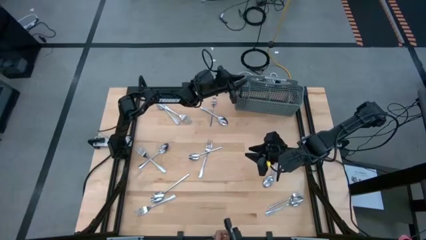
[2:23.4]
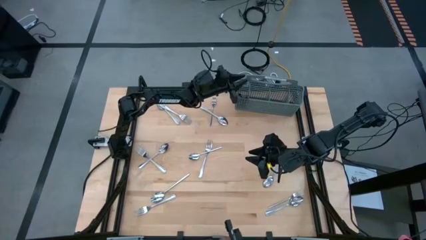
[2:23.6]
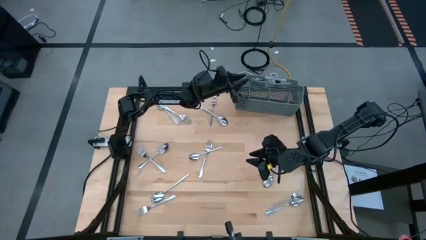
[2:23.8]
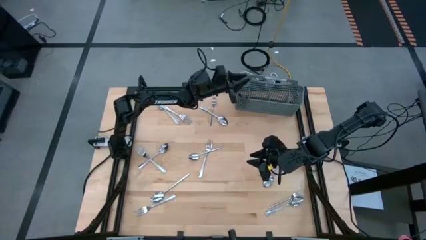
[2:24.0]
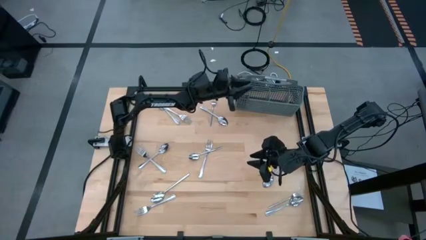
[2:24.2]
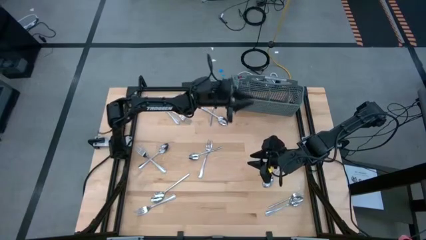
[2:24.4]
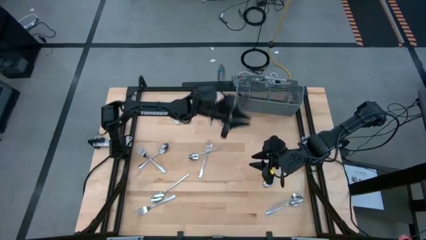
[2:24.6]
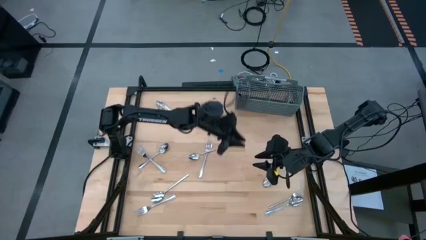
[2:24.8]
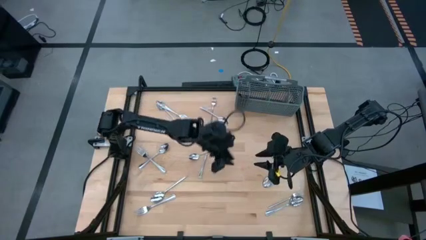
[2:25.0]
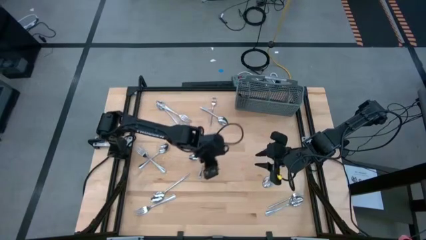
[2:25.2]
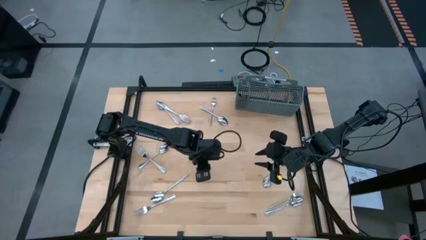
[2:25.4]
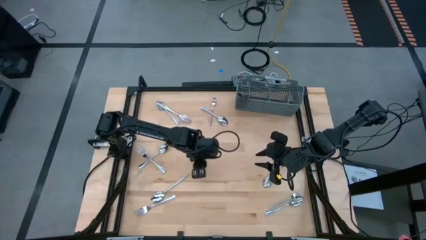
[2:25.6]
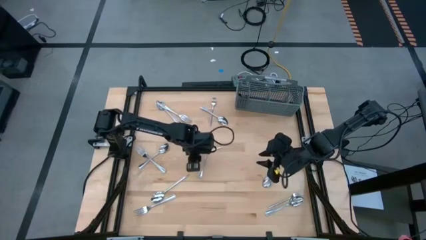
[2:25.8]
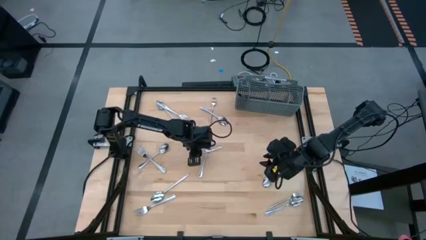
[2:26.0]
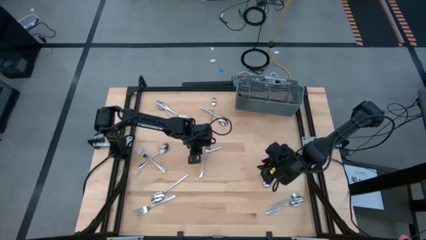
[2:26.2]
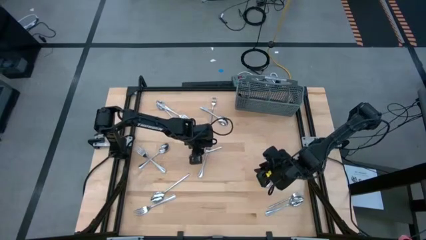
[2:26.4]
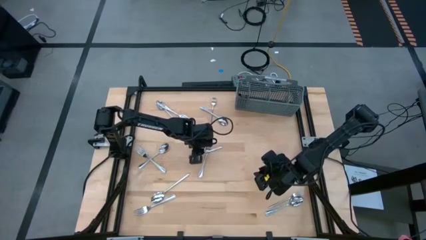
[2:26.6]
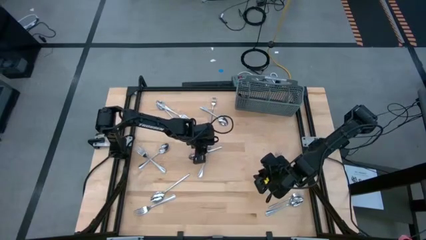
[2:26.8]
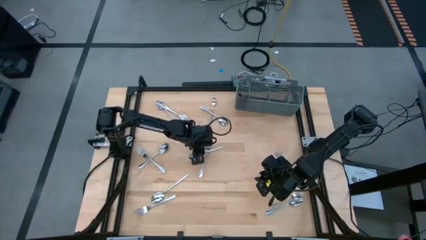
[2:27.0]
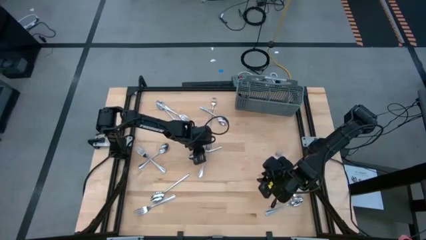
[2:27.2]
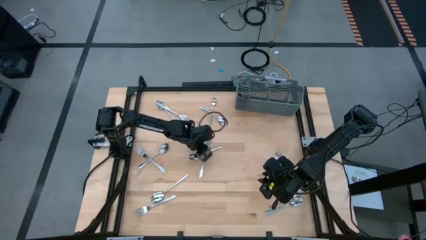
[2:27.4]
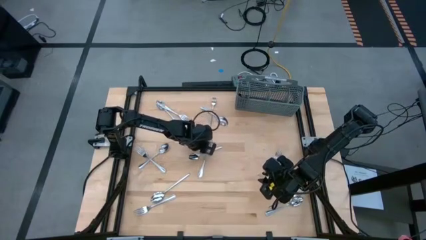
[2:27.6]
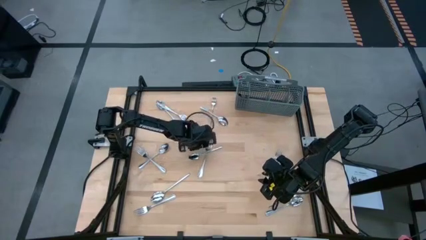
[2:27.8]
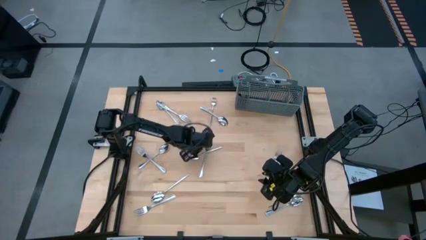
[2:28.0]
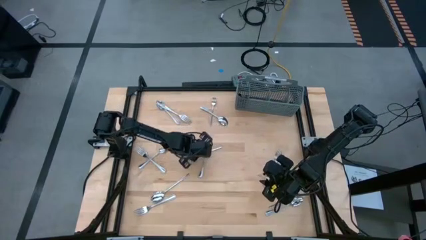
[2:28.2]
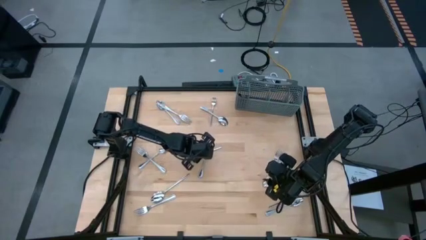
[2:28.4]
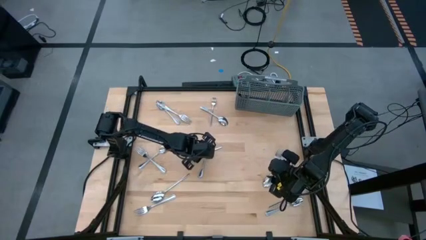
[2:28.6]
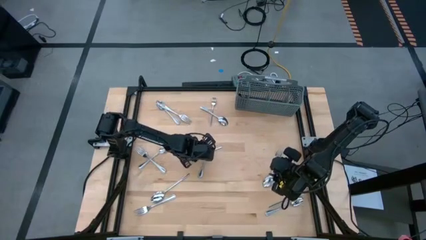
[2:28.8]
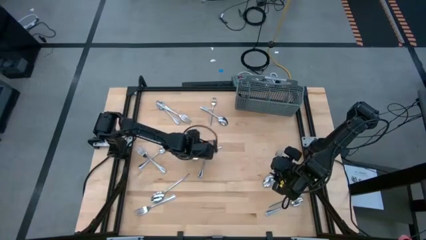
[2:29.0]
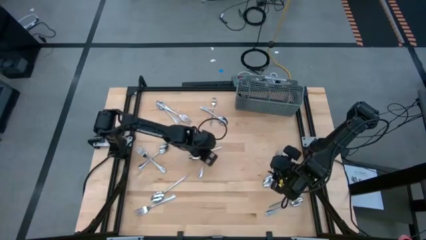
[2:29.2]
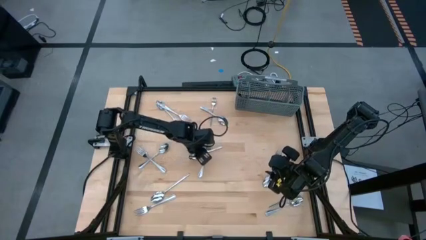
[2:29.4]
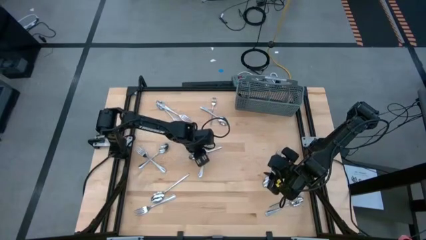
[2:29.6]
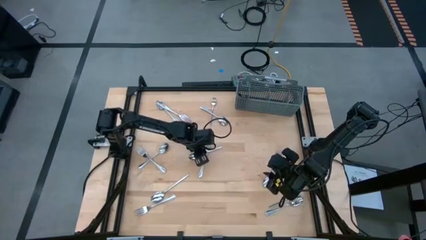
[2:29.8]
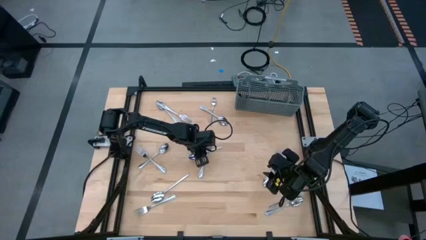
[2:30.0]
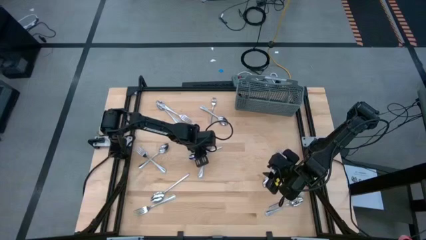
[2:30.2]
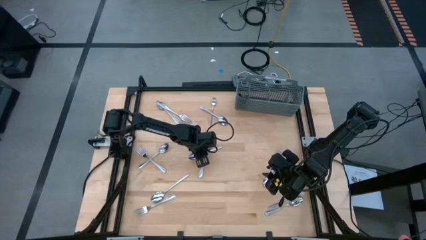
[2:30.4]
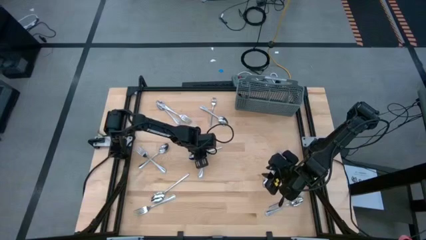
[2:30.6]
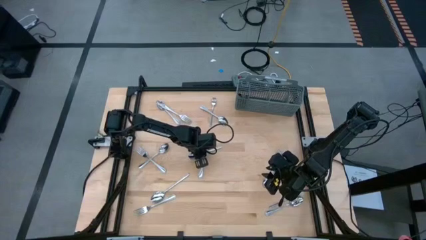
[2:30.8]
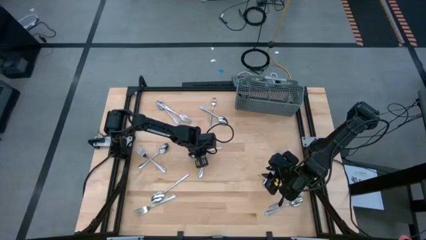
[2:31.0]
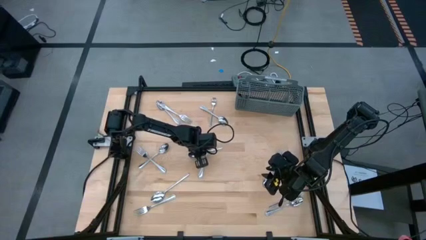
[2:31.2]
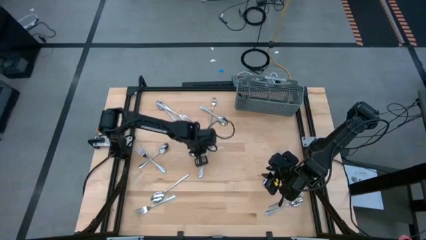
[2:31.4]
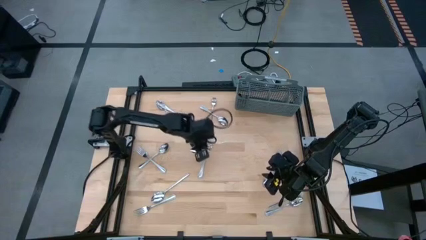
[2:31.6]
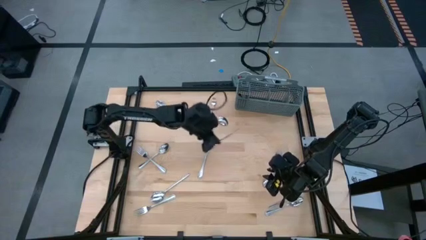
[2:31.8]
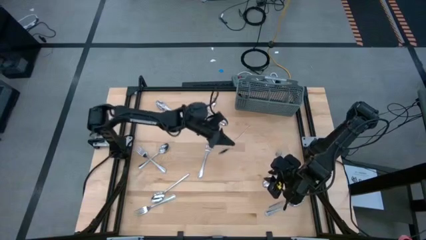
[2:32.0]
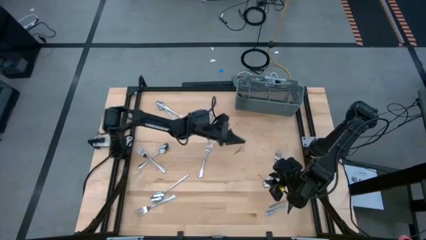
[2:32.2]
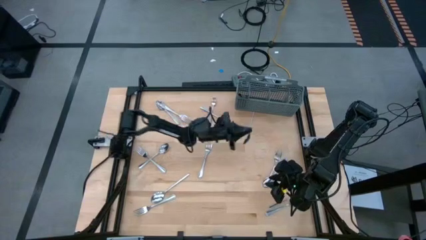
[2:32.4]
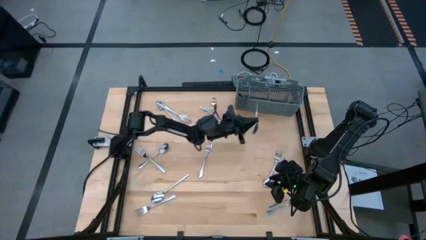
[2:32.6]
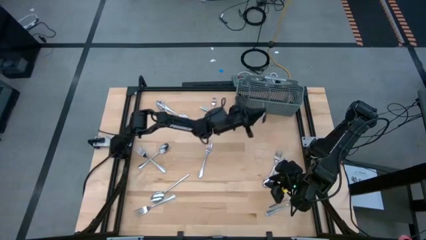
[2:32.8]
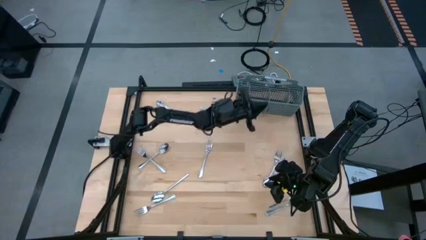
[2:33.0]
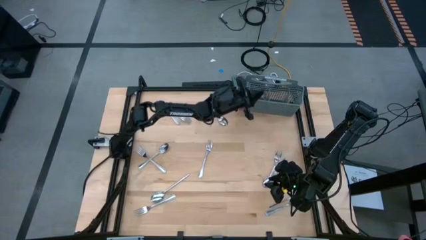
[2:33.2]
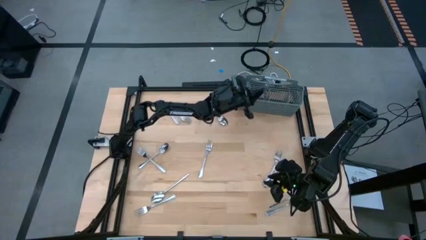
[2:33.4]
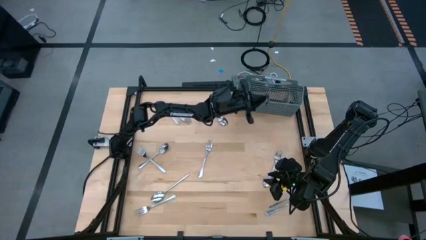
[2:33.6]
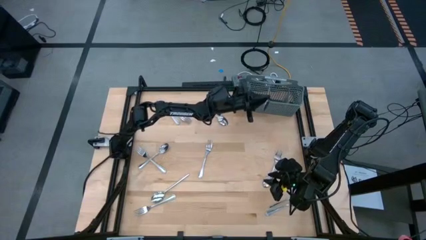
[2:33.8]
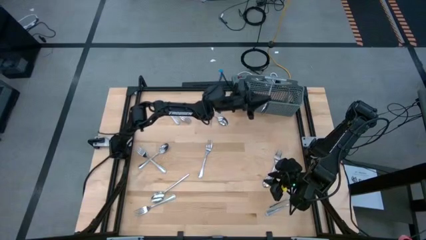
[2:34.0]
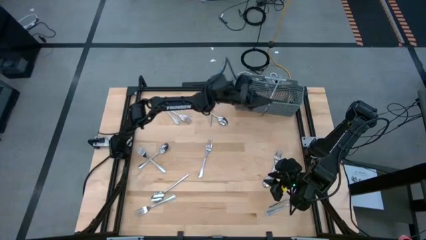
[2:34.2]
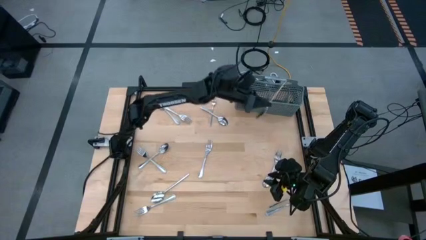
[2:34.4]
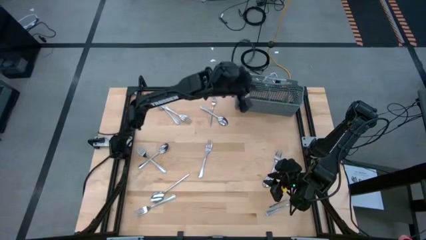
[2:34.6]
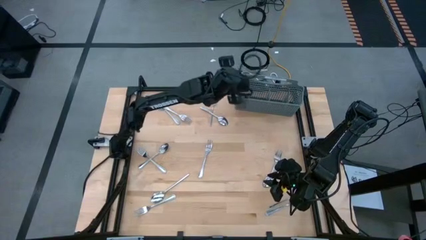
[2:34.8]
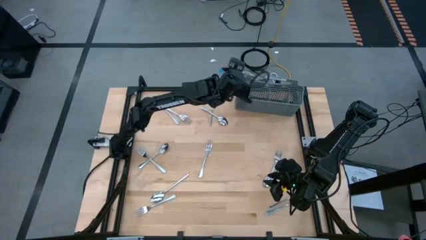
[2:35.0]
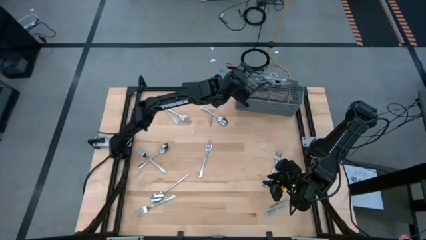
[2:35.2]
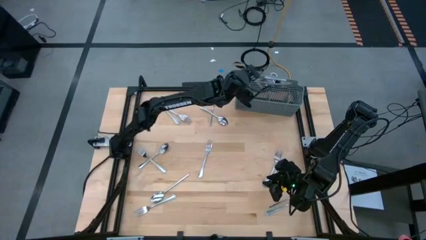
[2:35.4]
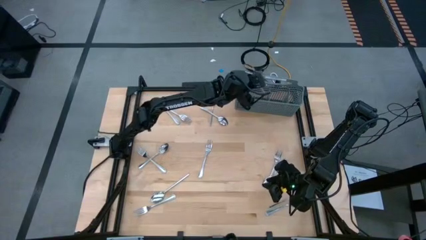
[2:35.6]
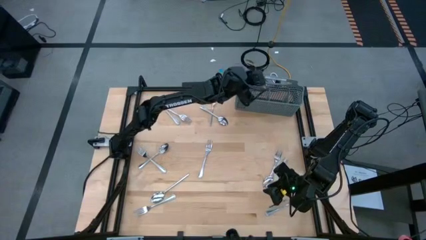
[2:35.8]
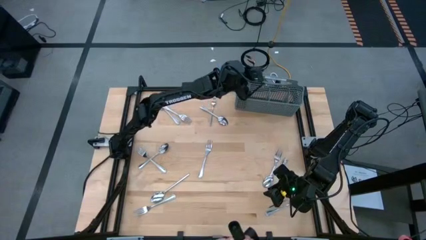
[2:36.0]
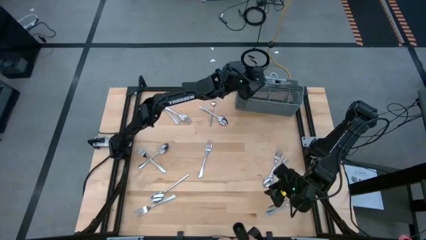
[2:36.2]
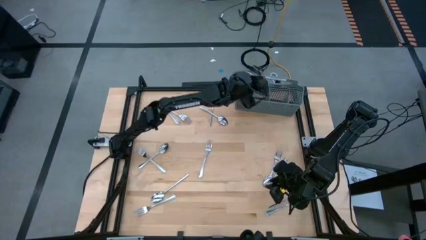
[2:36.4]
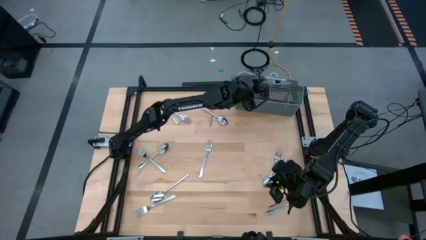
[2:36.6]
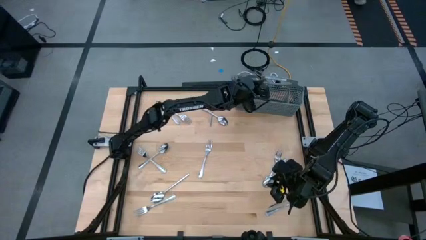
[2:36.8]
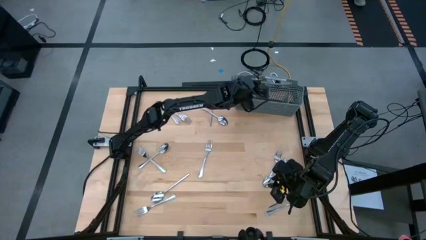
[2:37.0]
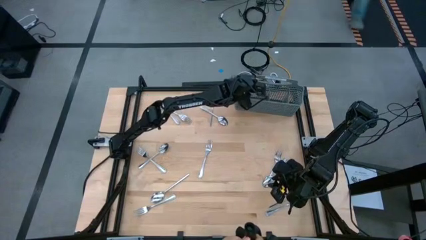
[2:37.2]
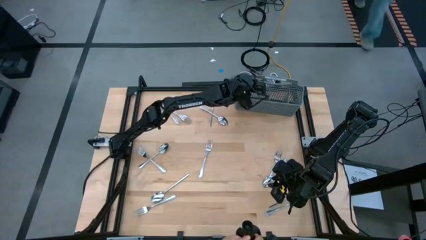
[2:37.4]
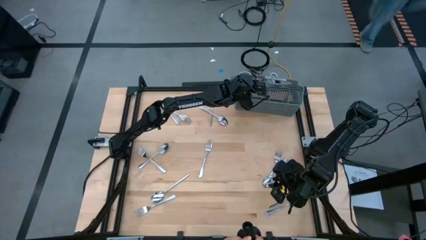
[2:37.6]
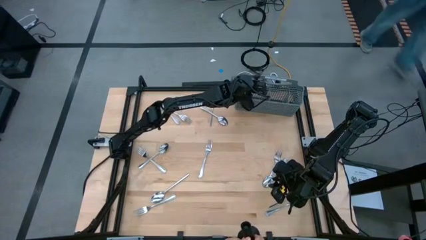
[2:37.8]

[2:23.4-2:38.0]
Task: Sort silverware
Put the silver spoon into the silverware basket

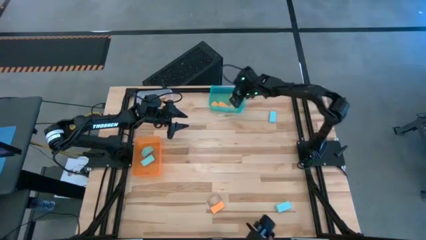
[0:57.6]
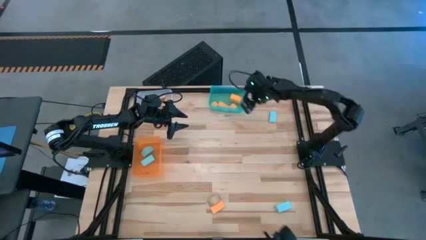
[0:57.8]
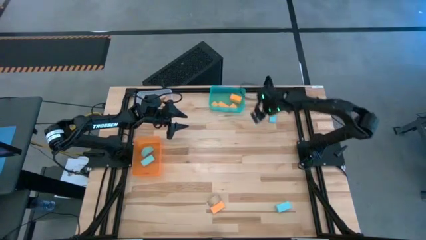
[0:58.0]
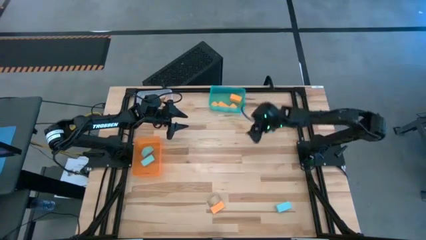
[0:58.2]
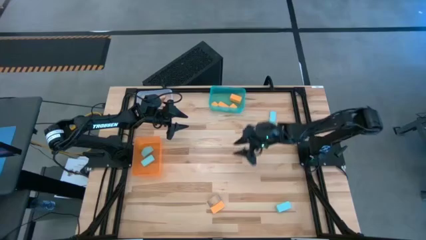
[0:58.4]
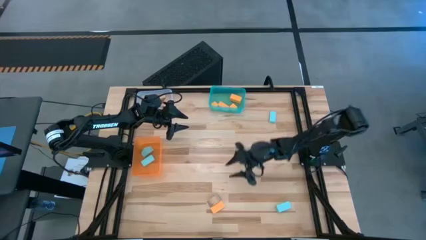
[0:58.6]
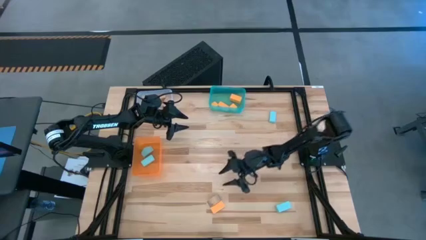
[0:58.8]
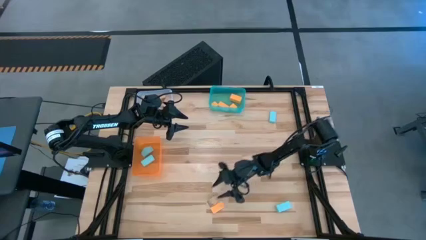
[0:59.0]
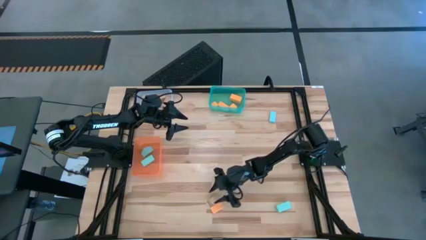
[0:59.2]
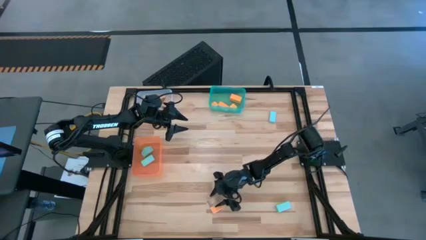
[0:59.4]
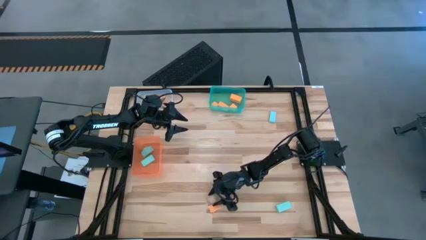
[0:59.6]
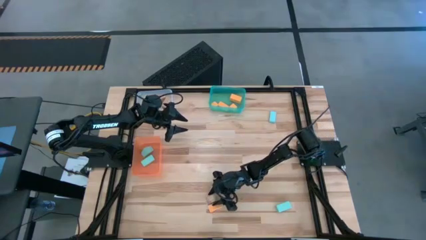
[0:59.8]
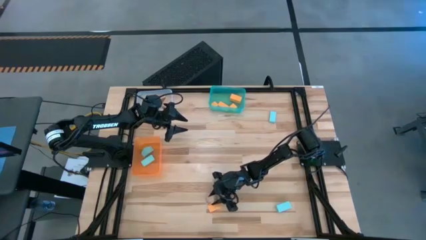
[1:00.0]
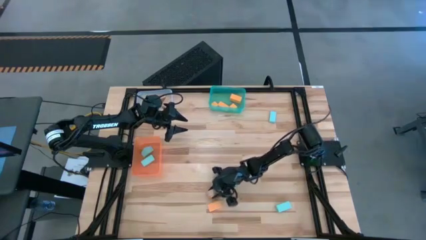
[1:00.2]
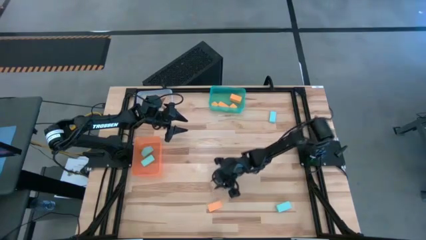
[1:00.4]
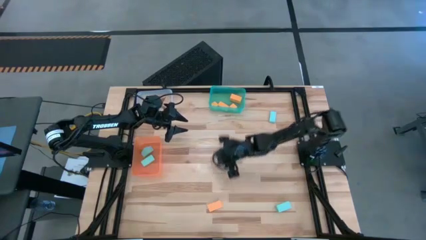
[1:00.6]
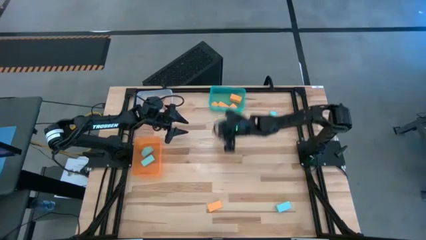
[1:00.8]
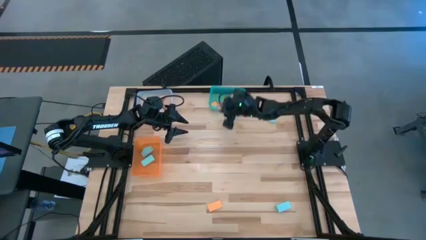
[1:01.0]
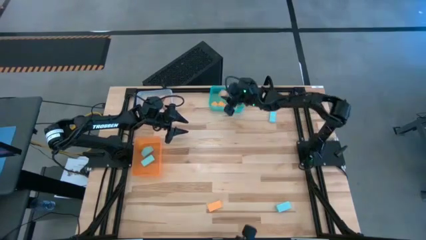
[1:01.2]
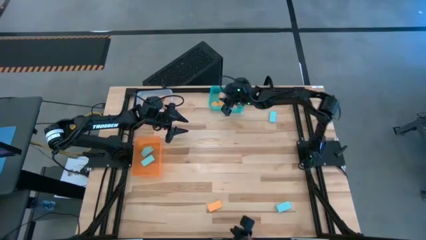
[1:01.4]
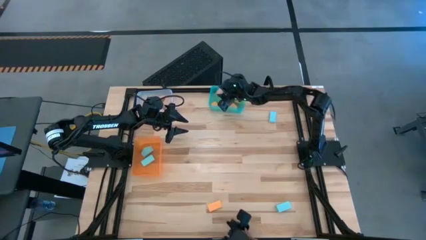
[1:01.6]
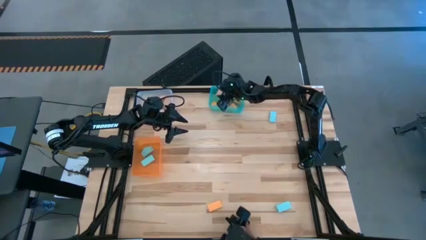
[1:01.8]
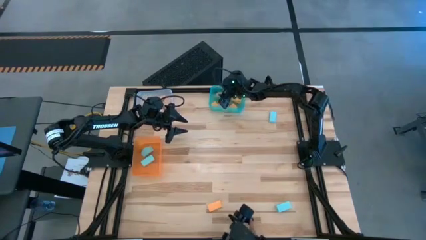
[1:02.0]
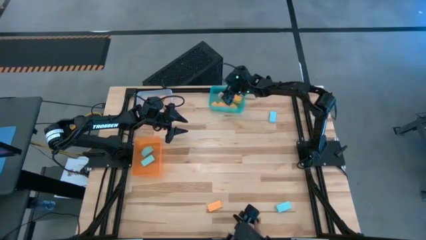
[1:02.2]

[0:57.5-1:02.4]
Task: Sort & place blocks by color
Put the light brown block into the transparent bin
